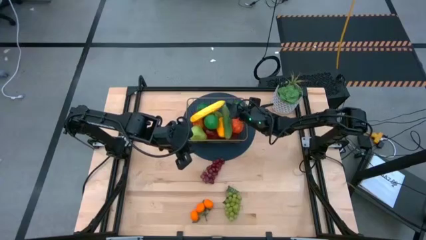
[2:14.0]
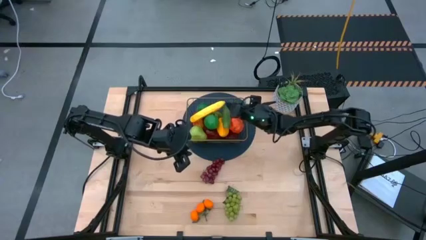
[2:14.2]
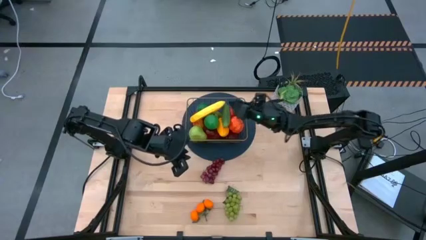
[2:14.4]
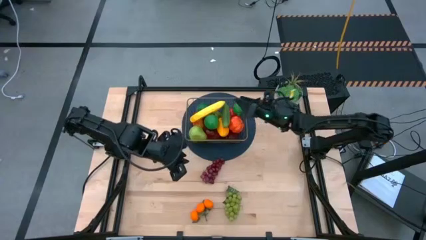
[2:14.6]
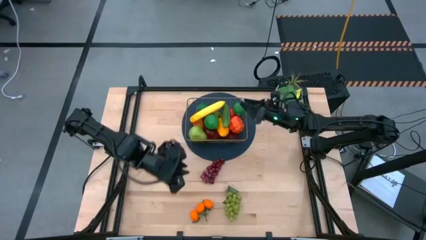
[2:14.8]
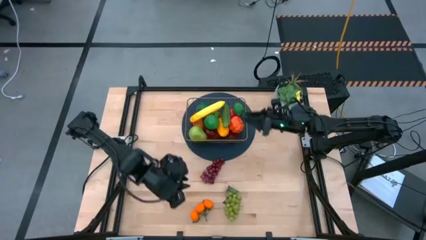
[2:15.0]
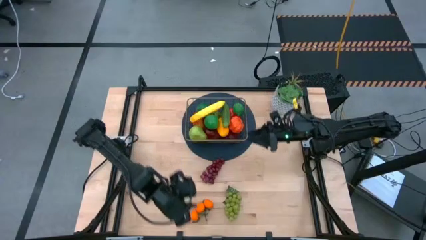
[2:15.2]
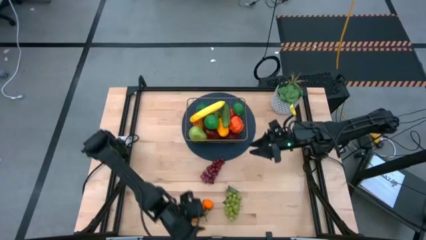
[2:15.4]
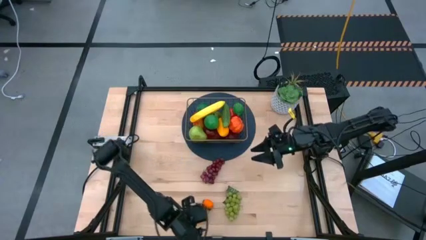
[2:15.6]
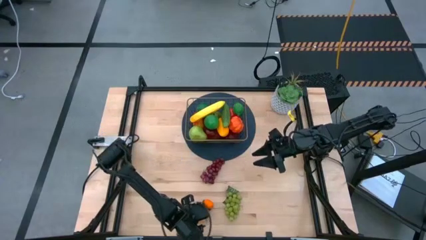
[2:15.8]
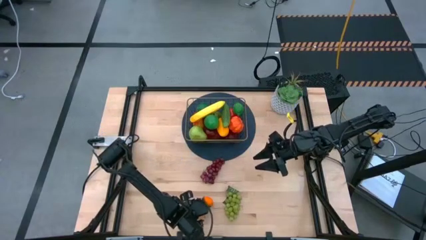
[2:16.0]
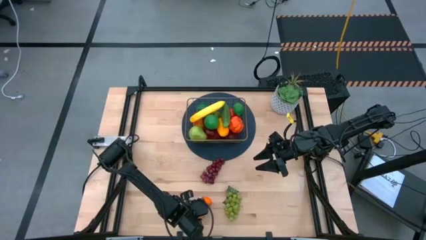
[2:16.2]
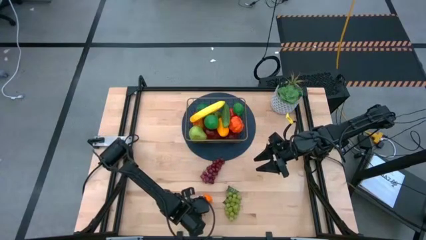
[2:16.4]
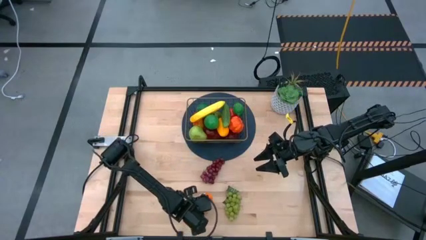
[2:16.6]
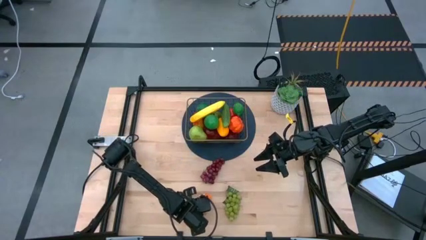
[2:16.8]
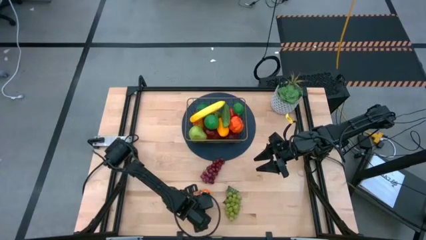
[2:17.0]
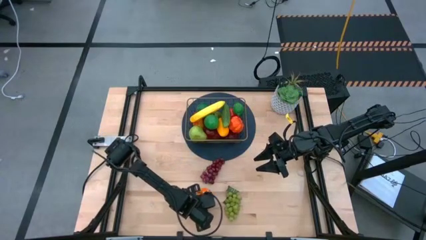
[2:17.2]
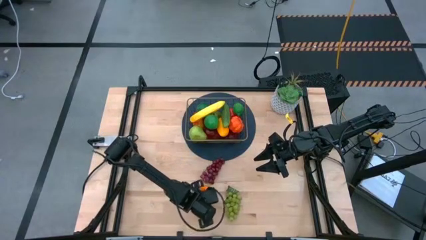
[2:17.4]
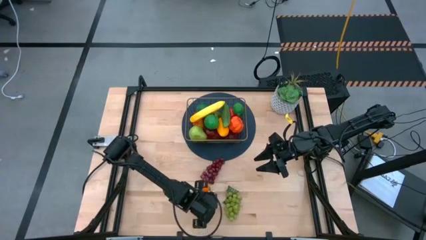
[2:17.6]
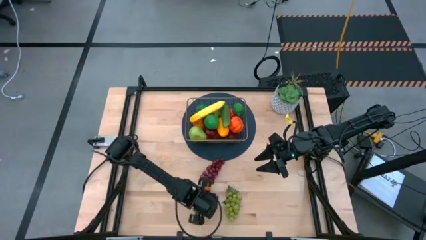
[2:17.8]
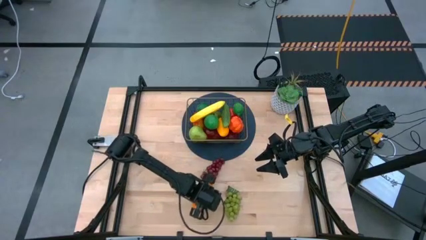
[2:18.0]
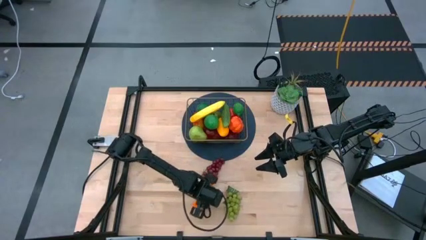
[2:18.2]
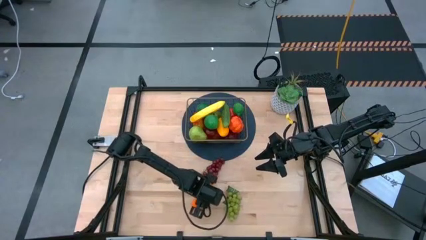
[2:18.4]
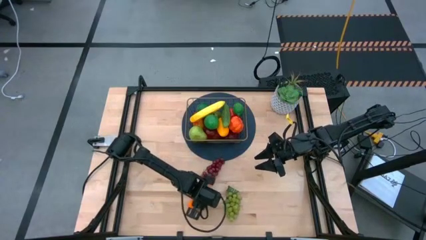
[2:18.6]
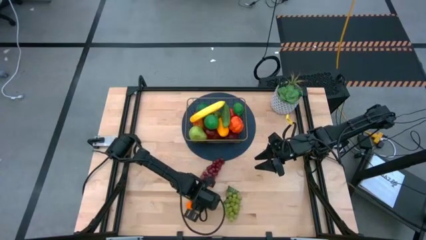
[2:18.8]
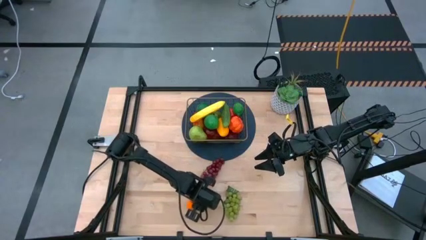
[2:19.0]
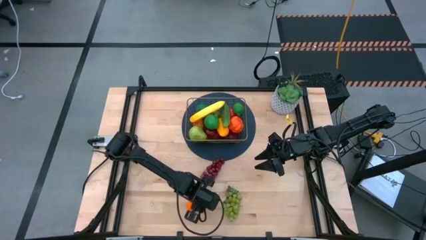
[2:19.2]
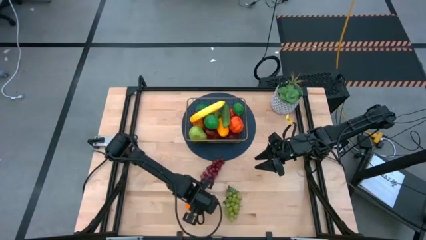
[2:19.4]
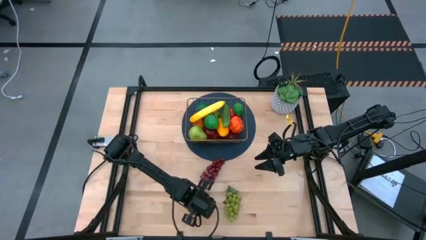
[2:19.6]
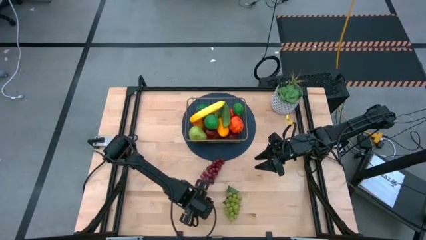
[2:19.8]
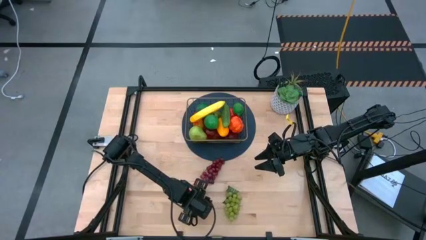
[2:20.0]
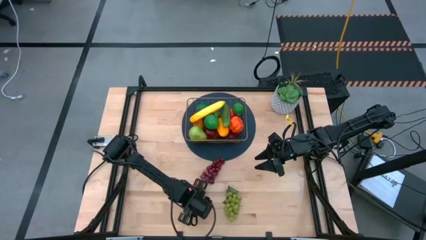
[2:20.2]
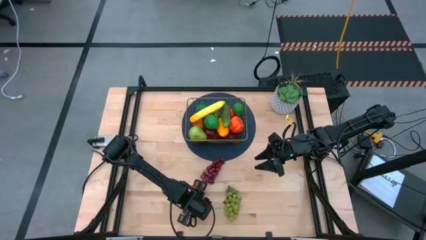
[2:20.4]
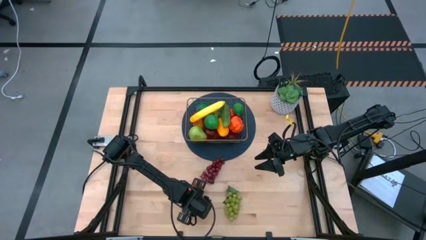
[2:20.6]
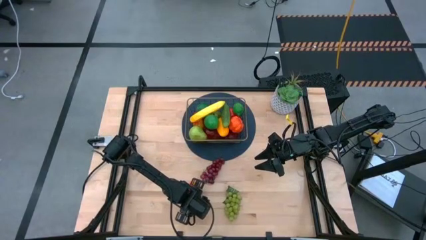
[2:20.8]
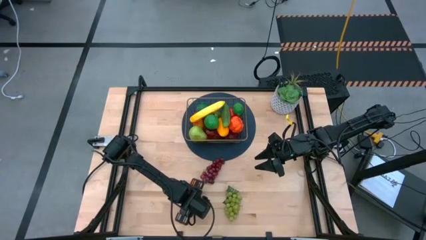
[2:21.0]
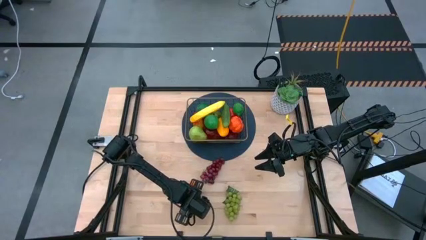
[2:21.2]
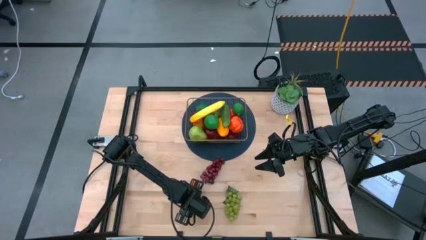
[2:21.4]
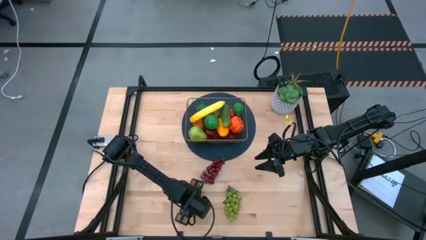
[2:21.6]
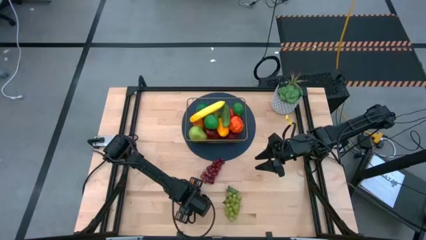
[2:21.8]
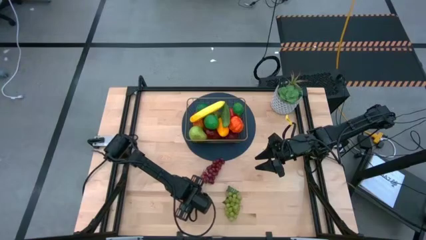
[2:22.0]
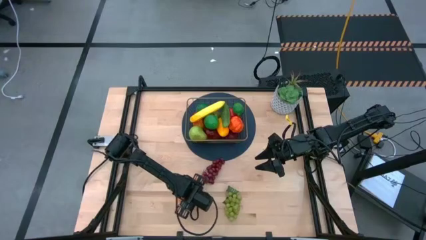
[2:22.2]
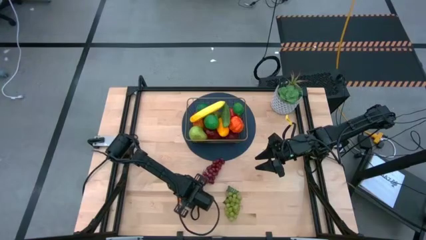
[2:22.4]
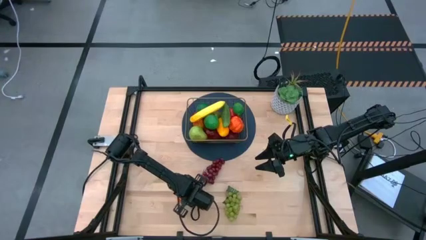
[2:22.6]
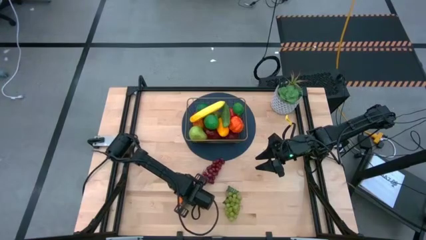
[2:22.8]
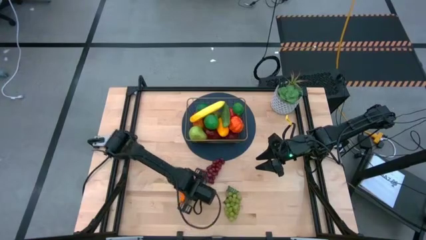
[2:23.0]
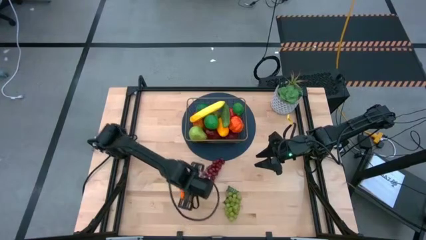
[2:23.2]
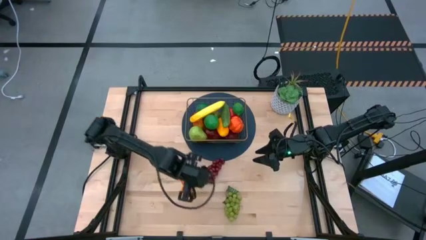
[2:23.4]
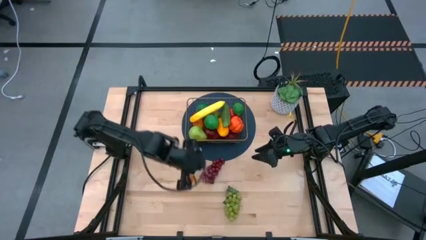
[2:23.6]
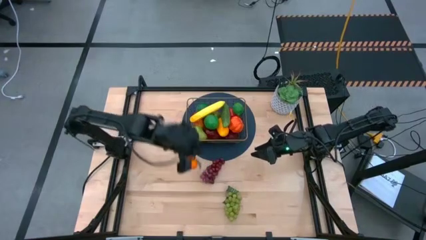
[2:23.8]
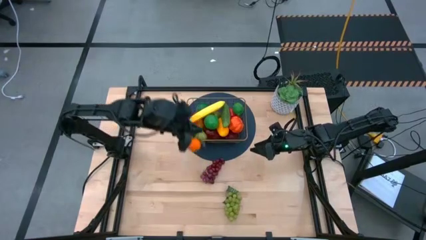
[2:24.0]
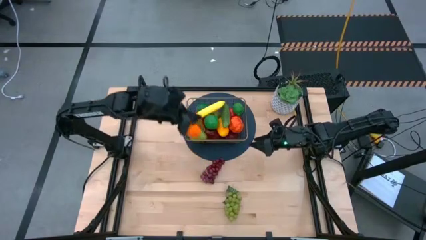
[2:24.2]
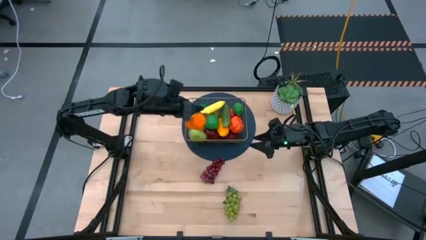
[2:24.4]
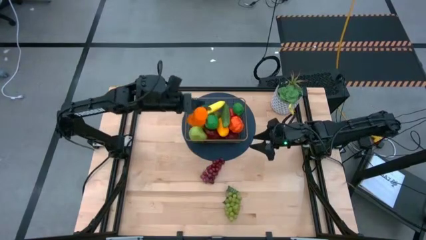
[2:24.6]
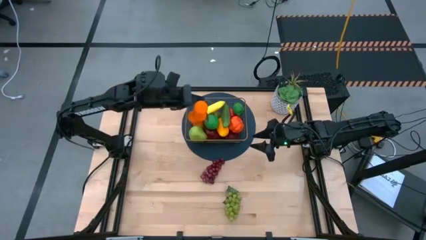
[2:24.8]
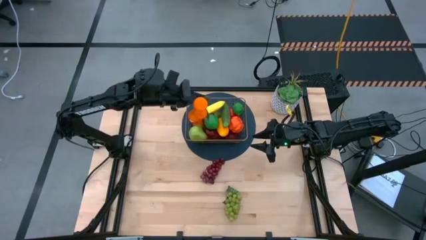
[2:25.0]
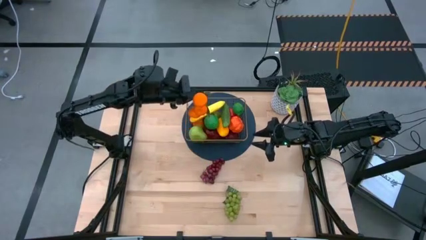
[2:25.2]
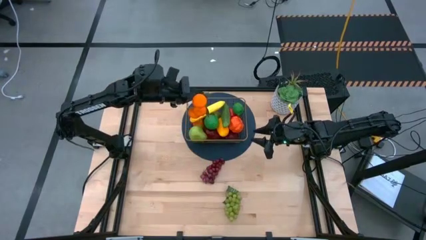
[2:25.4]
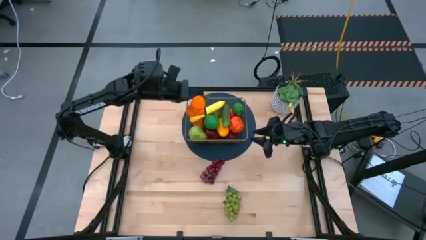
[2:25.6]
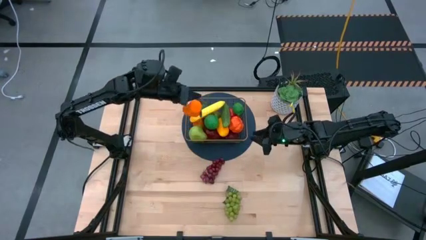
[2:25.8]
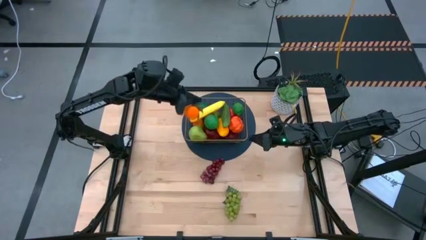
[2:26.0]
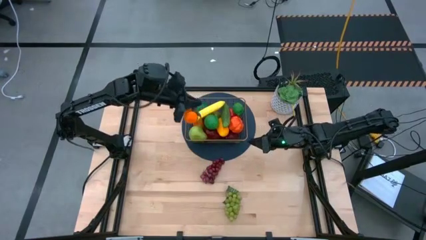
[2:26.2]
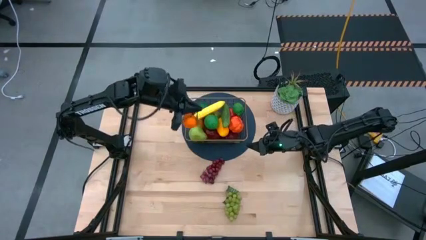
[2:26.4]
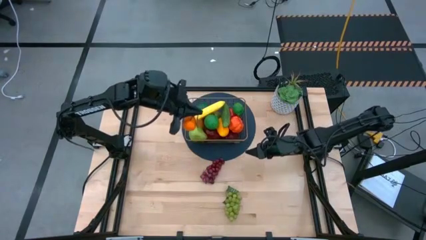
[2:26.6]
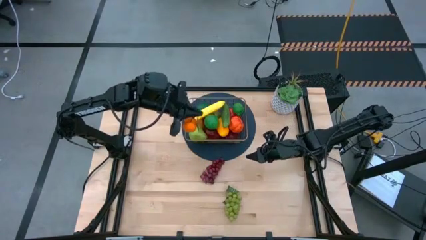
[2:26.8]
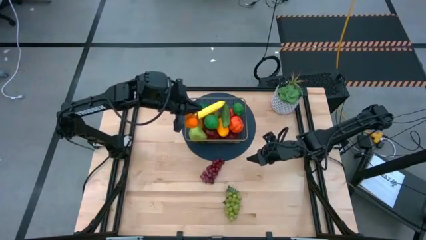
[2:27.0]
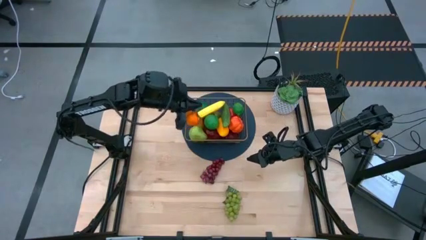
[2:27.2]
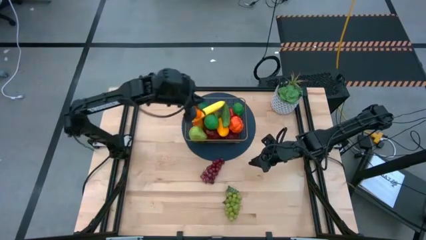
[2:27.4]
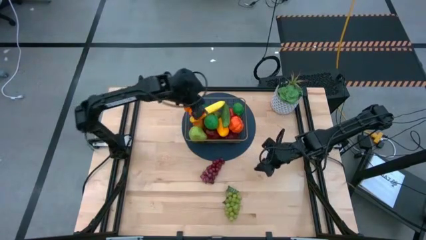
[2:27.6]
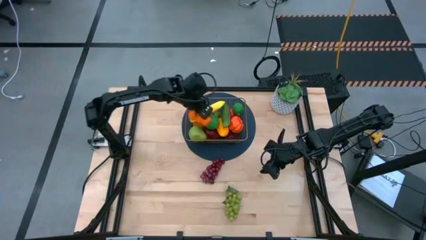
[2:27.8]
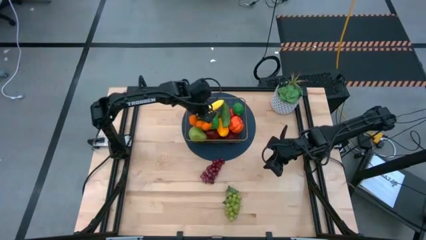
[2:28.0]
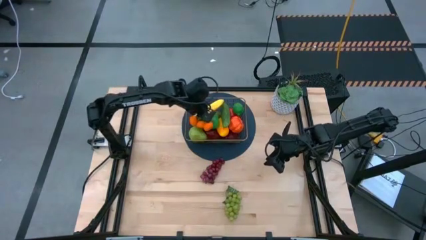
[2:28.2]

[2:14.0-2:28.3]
Task: Build produce basket
Put the orange tangerine into the wire basket

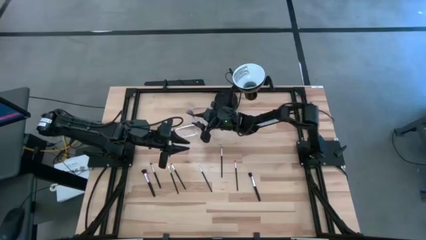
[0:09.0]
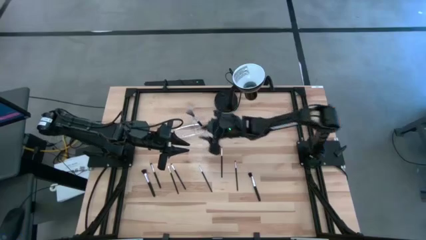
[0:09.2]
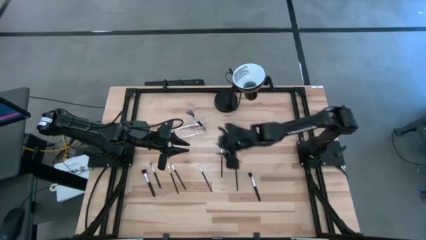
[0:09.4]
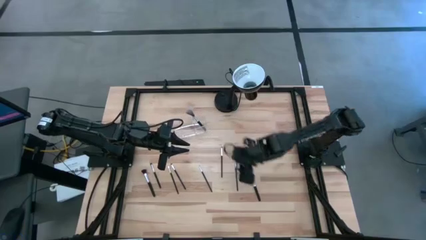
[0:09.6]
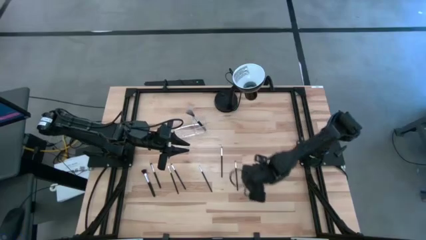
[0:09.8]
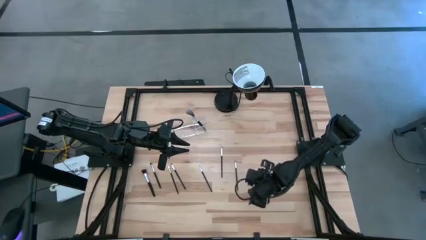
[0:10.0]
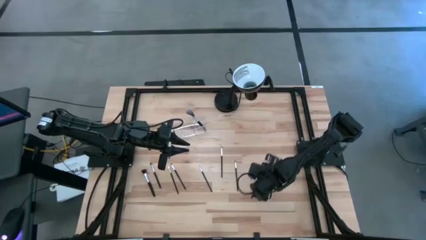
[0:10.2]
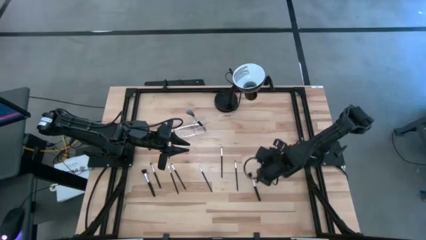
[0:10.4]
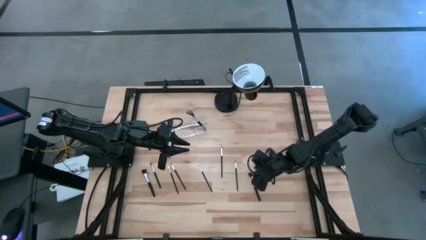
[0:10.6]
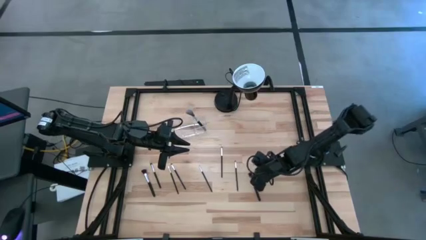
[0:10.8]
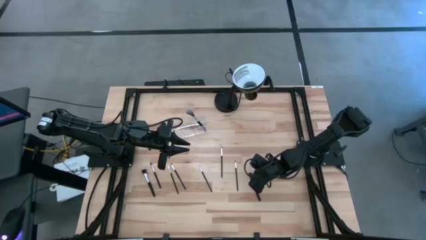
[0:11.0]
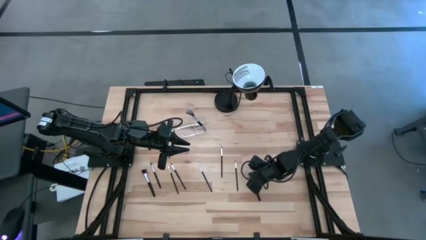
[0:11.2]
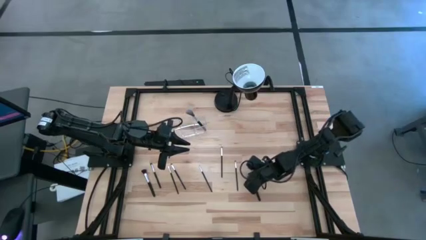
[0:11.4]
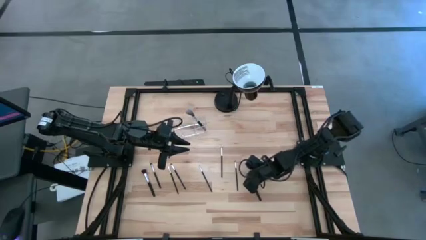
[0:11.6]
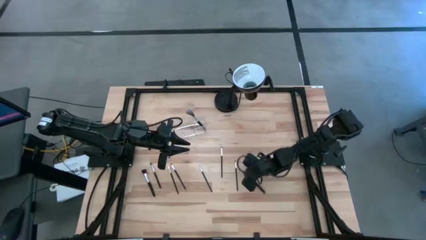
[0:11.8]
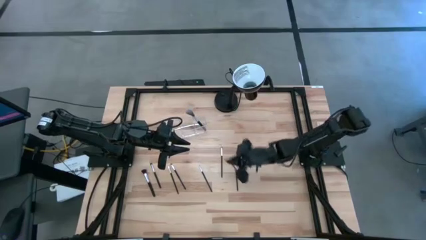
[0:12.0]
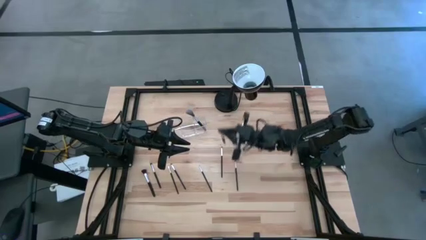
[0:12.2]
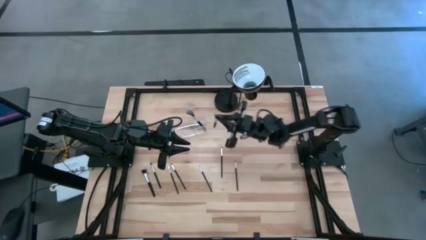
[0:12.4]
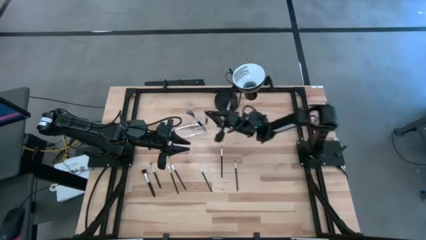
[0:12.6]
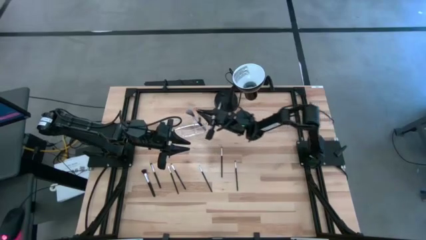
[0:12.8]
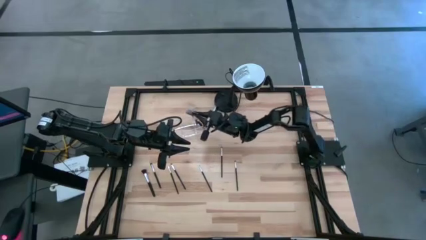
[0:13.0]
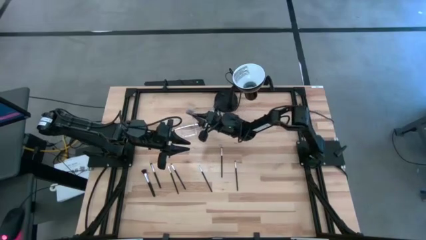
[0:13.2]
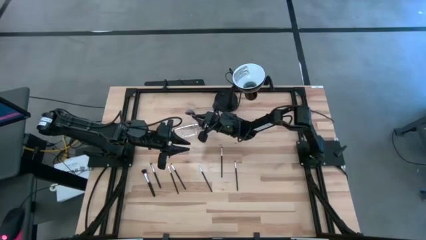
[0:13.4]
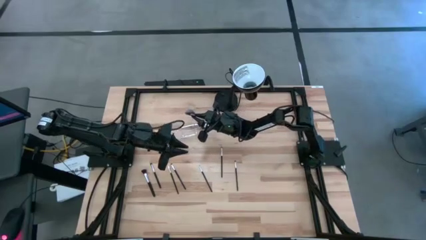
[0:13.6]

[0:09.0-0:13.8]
Task: Put items in baskets/containers
Put the black foundation brush into the transparent organizer
